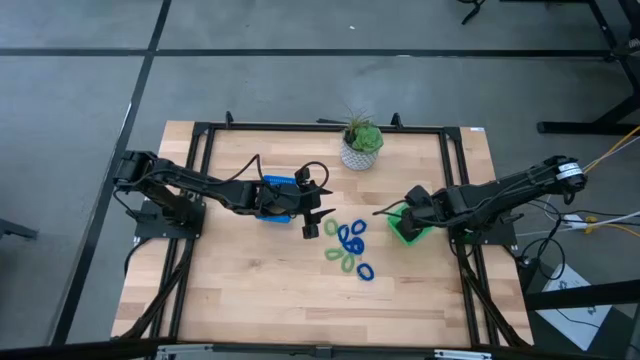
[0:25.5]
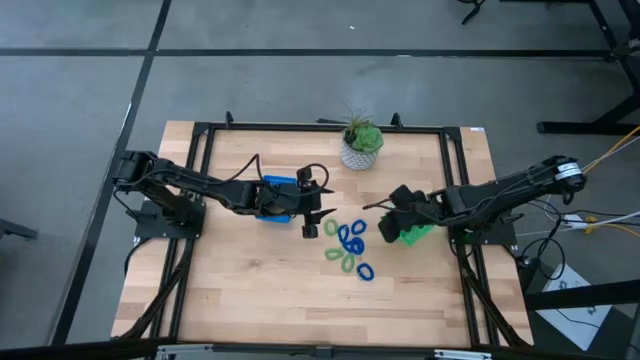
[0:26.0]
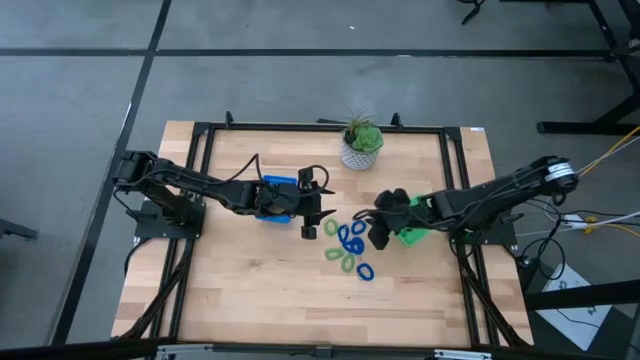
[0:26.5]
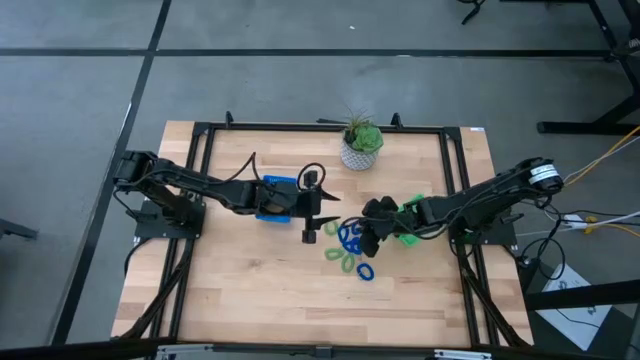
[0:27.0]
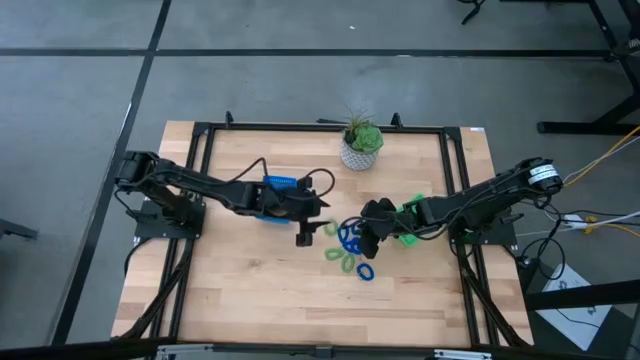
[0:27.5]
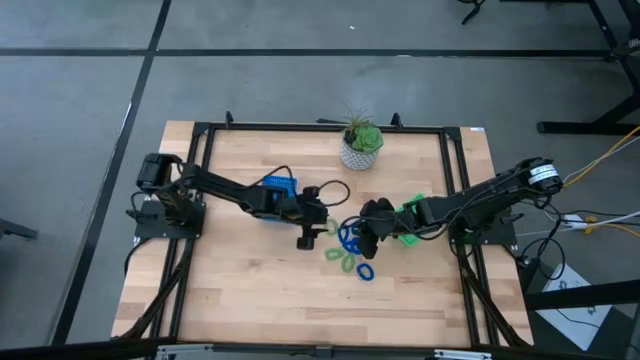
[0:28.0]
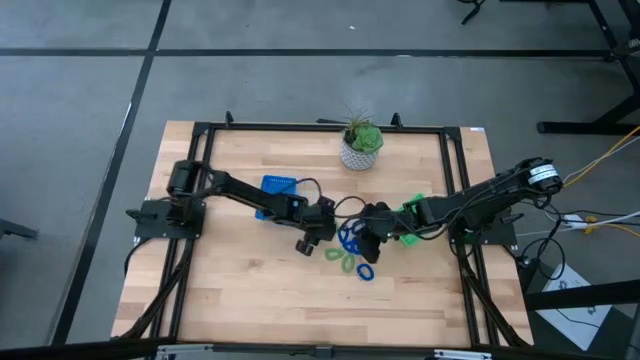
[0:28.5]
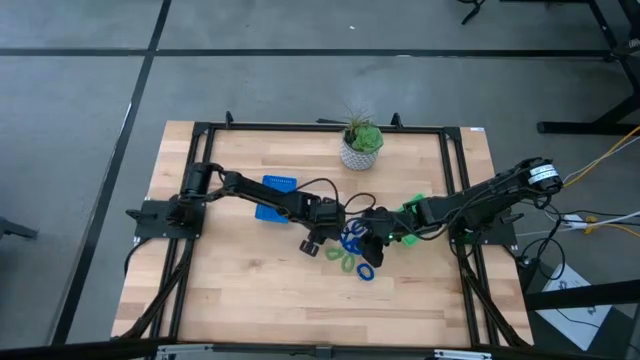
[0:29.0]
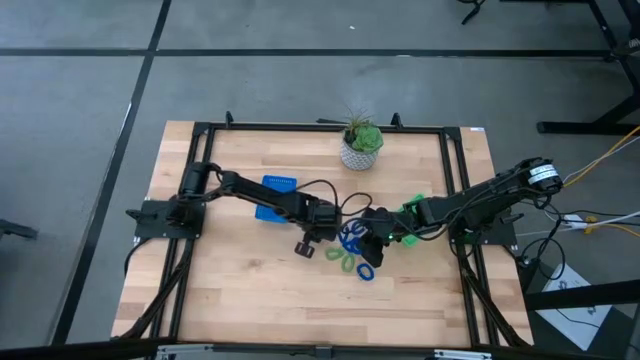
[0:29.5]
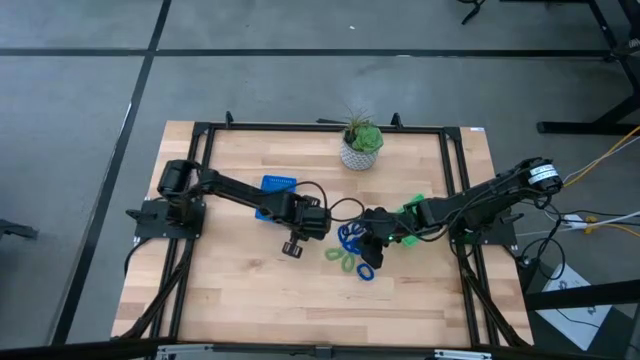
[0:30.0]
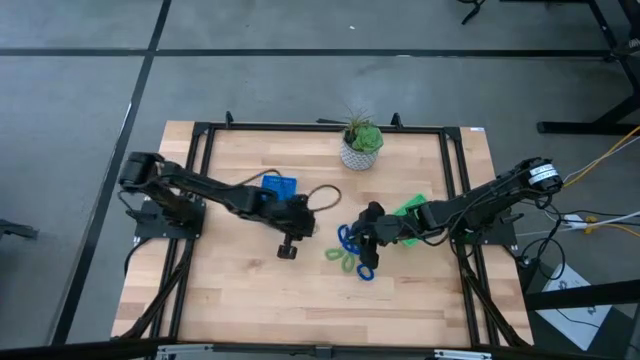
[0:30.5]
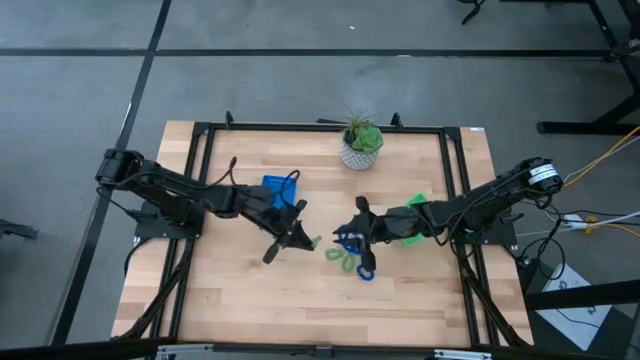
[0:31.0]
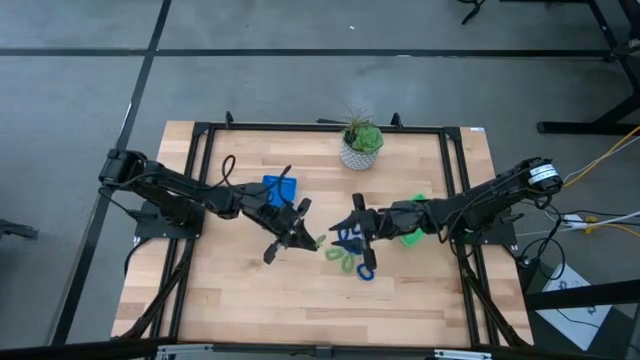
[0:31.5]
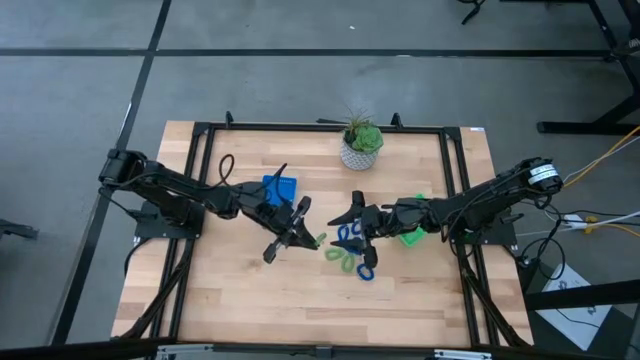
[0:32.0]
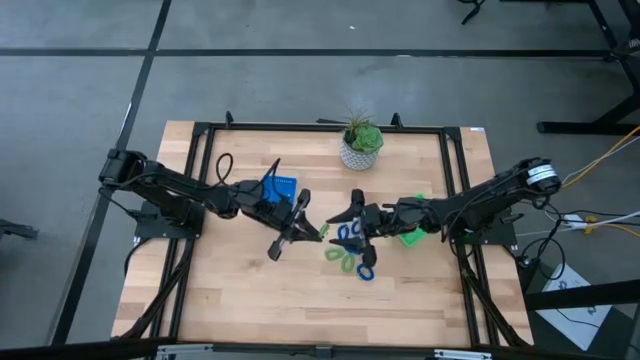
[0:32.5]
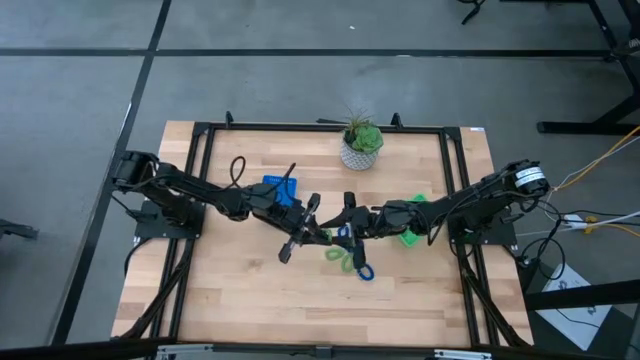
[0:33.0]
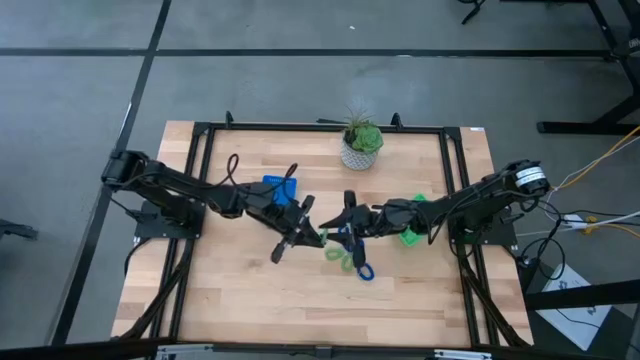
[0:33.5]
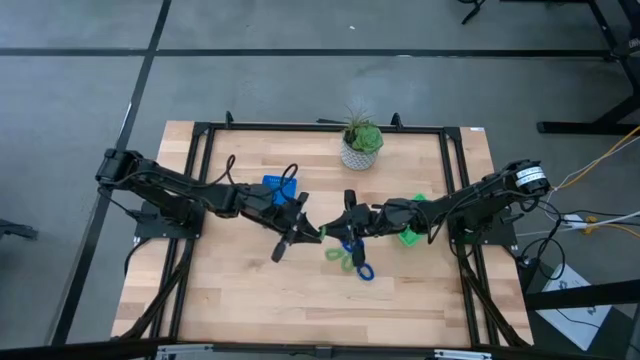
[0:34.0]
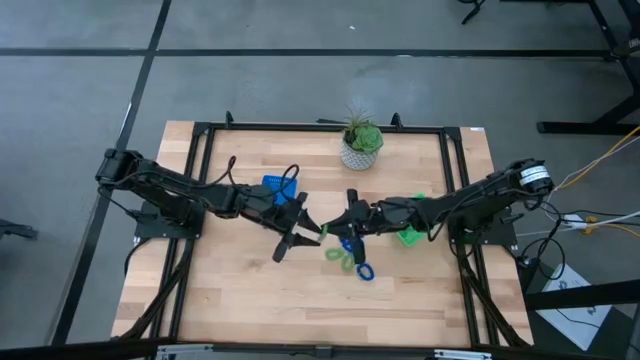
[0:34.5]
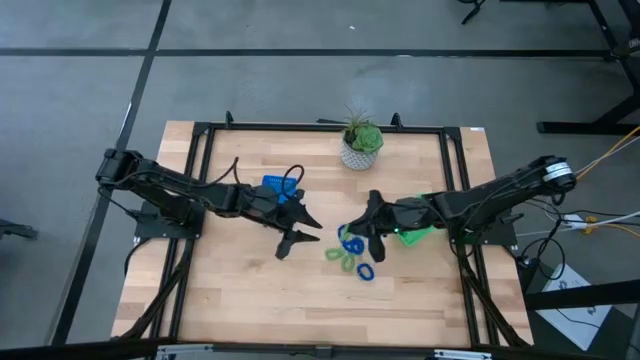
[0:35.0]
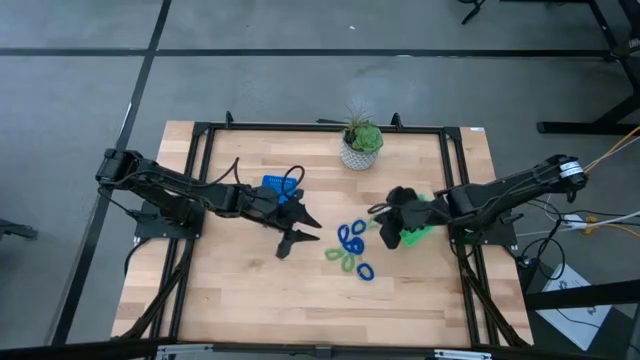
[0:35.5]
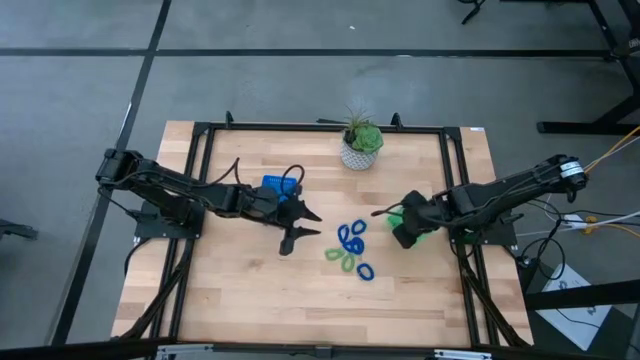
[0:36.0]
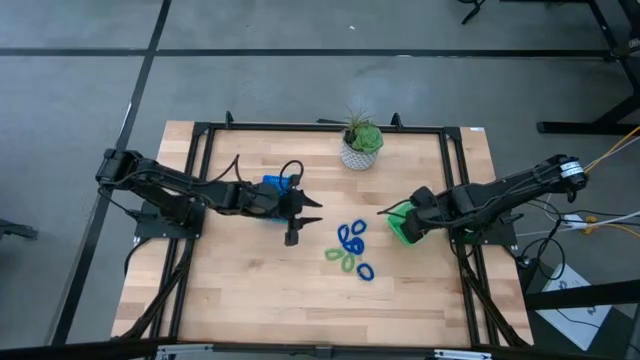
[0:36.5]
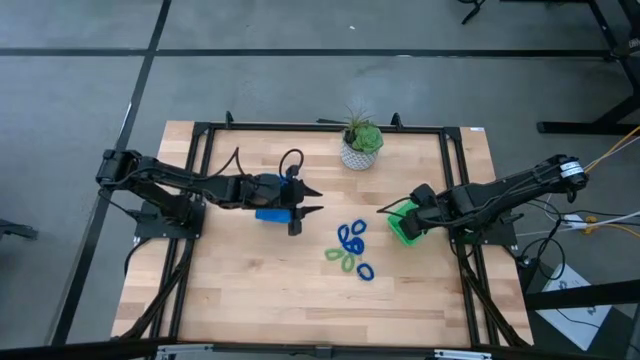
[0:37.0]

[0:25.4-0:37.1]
Task: Sort items
Put the green spring keychain into the green bin

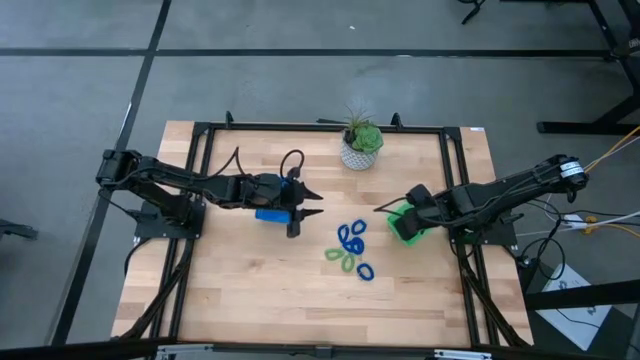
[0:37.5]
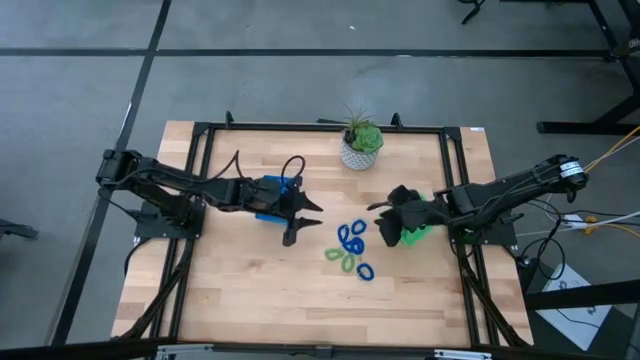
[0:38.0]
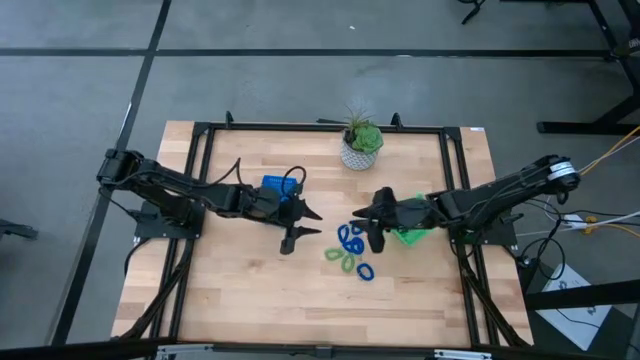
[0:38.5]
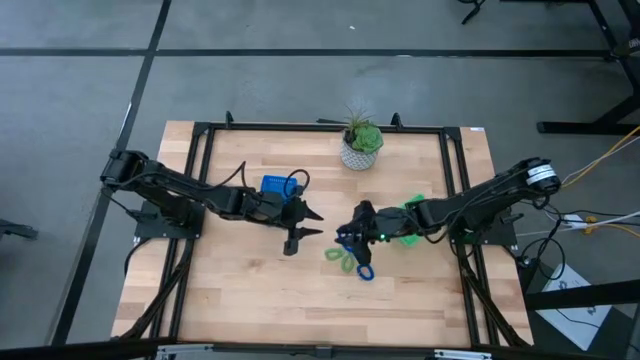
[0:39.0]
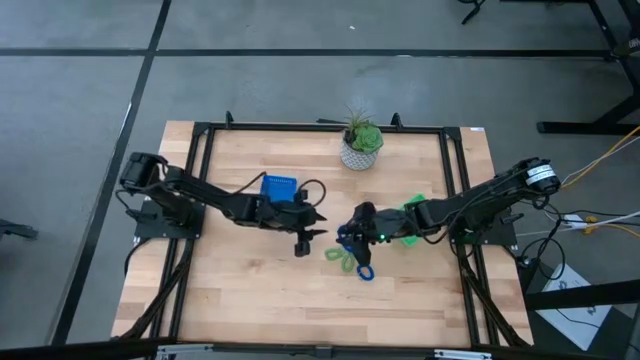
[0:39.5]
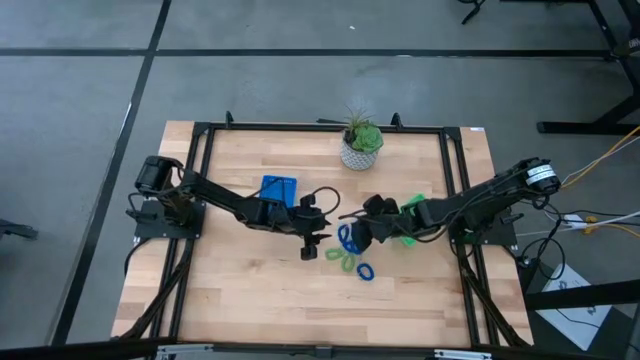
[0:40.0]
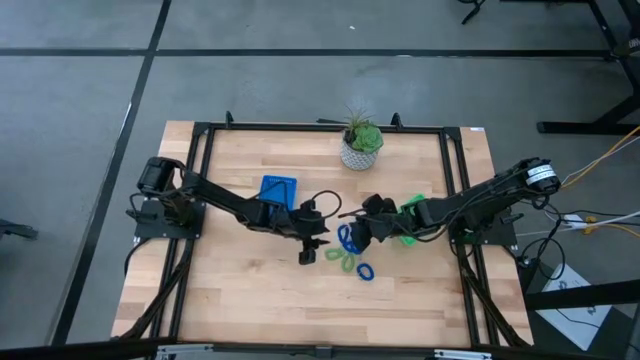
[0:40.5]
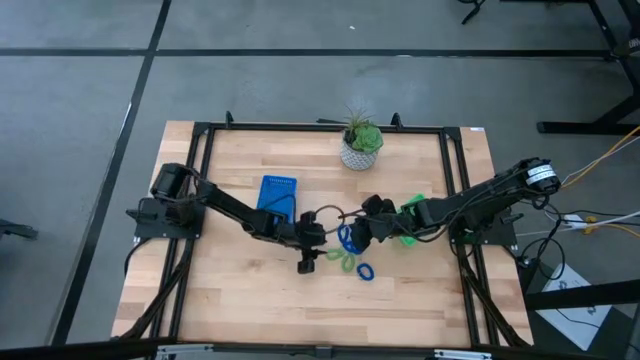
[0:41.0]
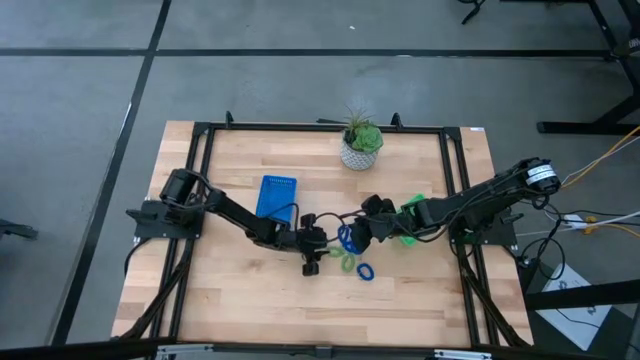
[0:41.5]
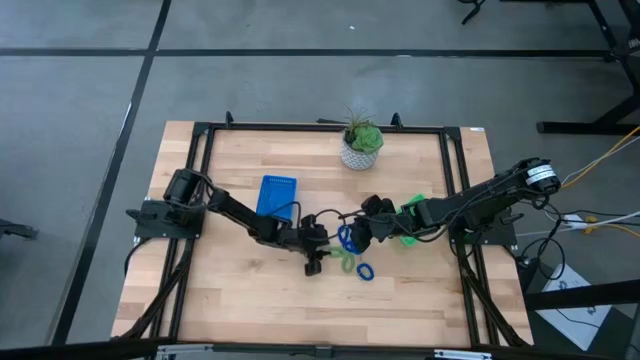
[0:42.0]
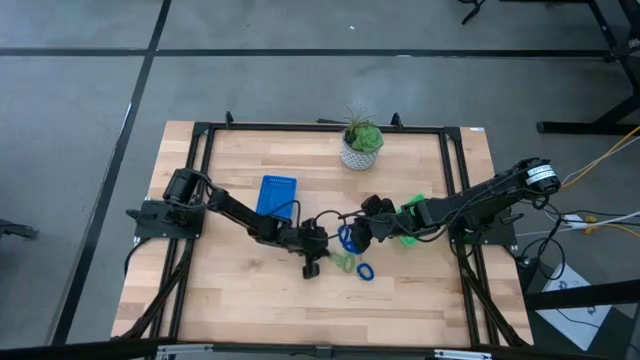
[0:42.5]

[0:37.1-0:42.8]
Put the green spring keychain into the green bin

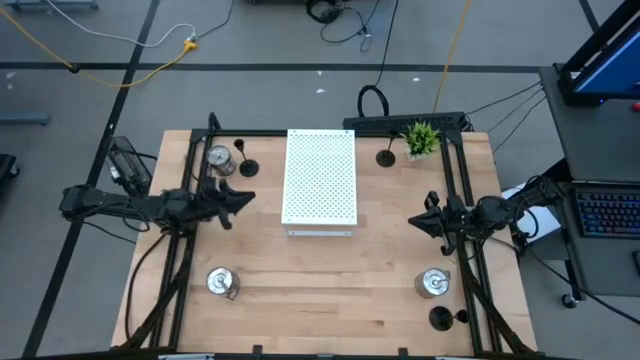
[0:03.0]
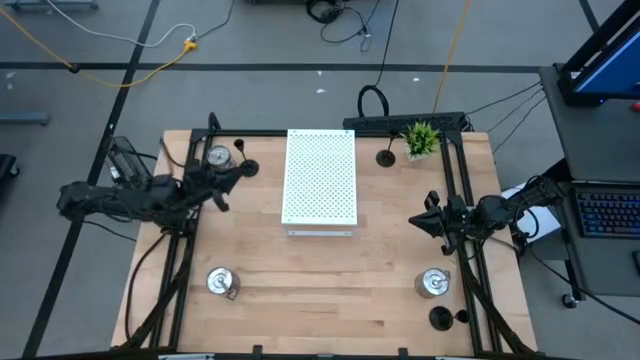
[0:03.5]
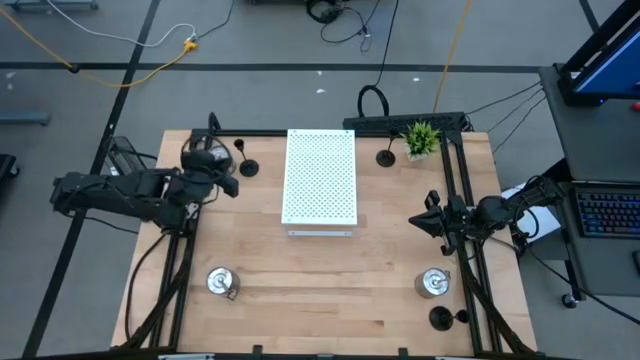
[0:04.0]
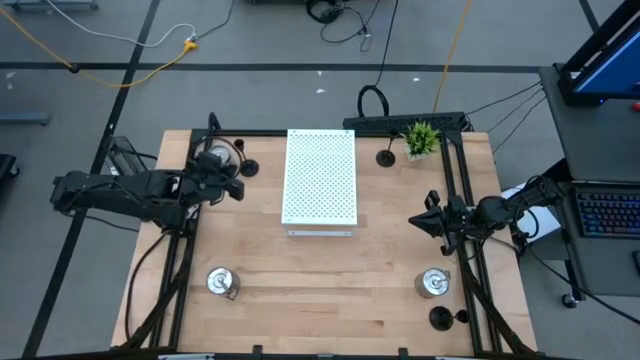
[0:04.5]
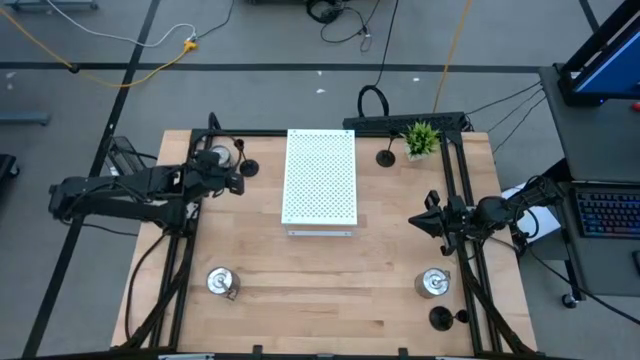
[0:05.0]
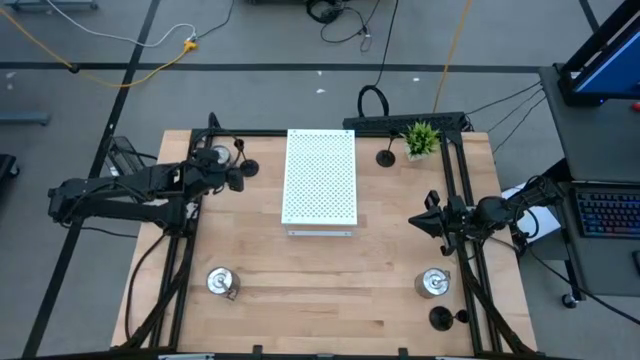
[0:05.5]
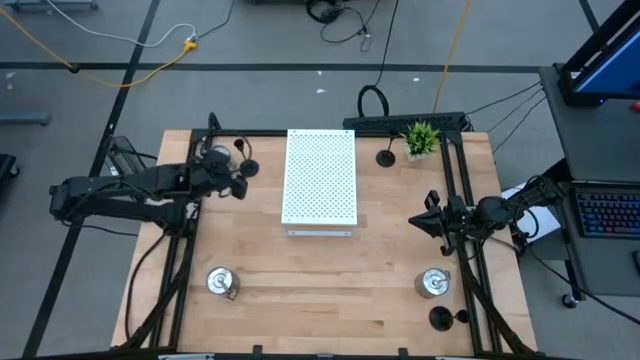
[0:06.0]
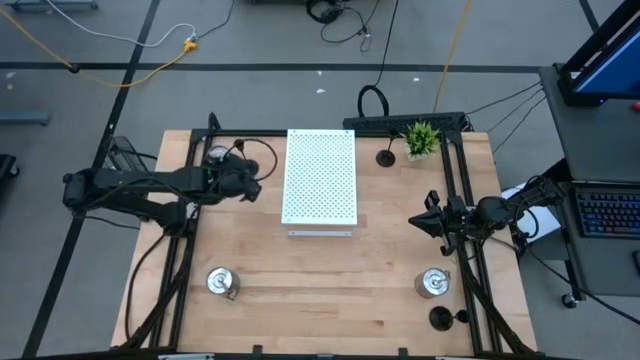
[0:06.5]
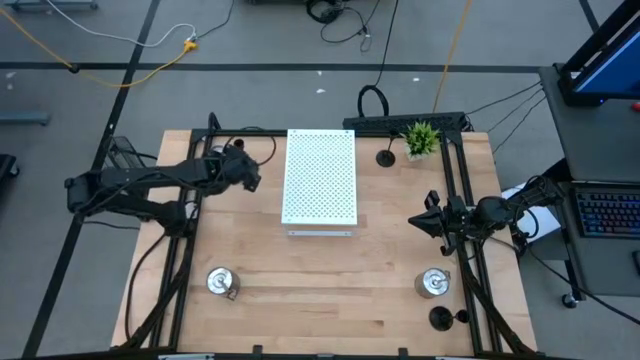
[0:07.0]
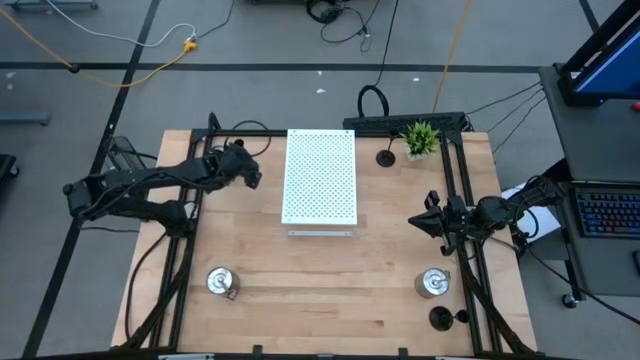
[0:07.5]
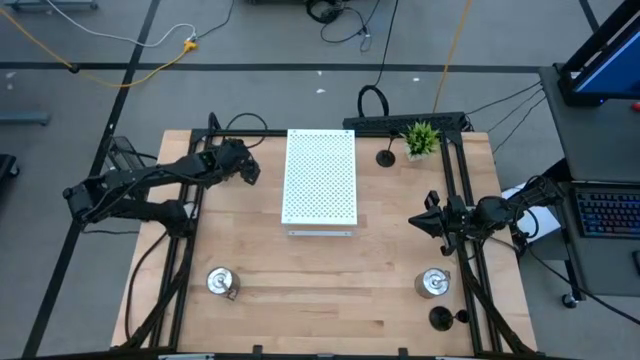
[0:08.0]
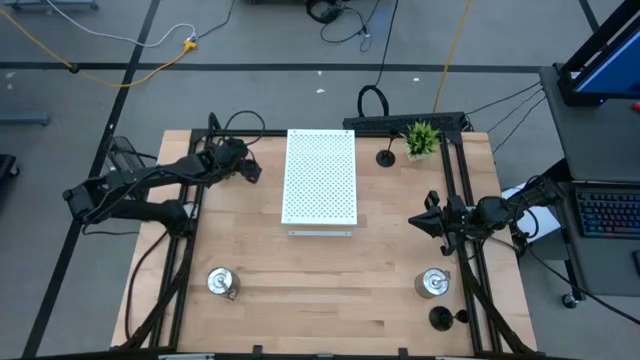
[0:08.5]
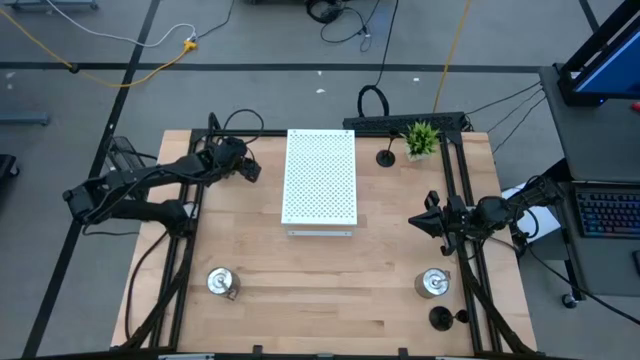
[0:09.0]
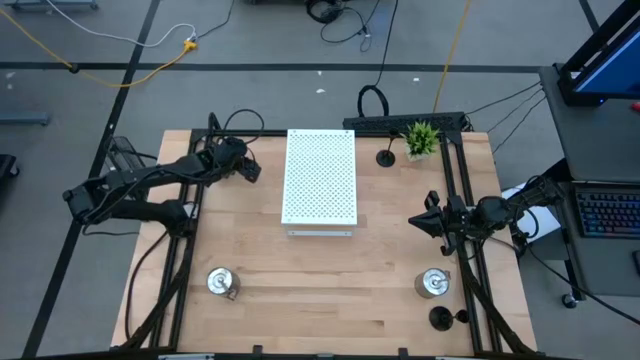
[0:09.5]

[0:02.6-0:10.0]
Task: Pick & Place candle stick holders
Put the top left black candle holder on the shelf
